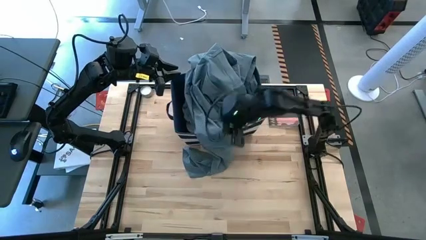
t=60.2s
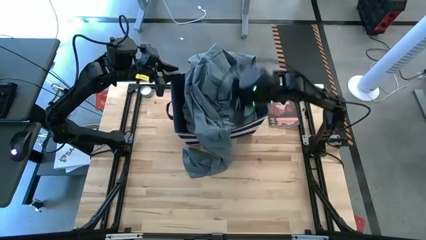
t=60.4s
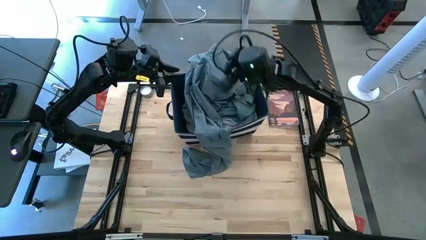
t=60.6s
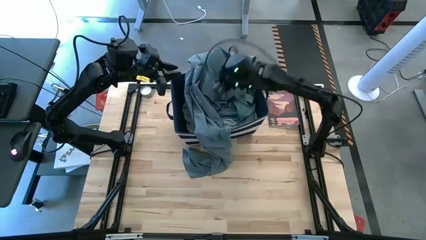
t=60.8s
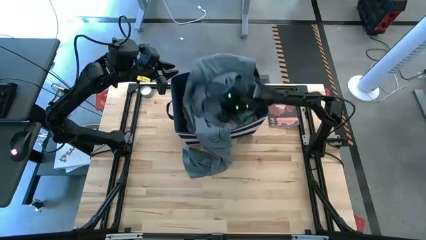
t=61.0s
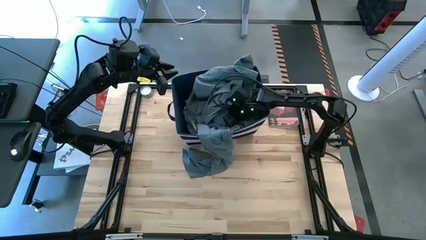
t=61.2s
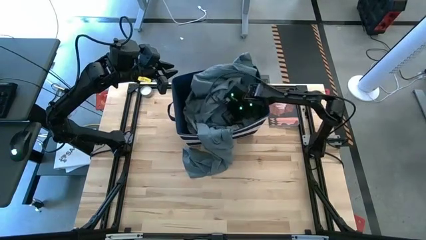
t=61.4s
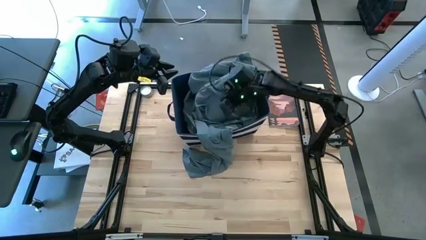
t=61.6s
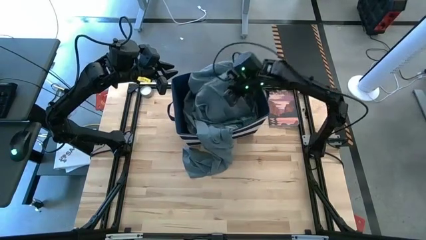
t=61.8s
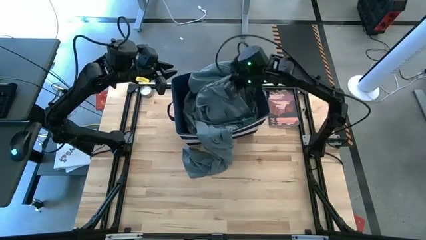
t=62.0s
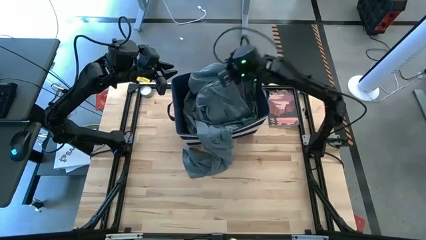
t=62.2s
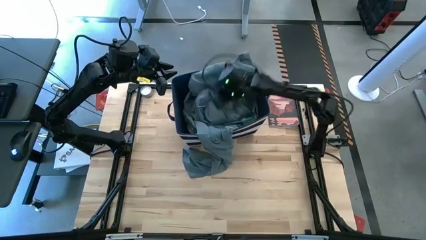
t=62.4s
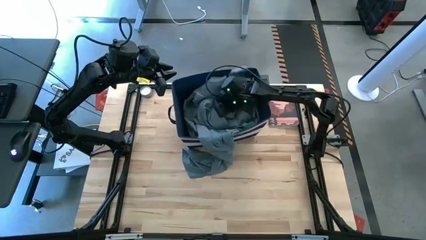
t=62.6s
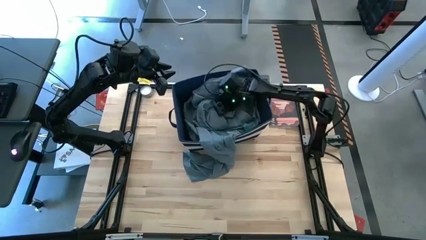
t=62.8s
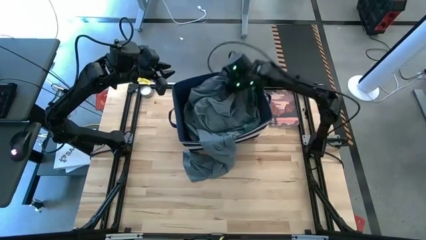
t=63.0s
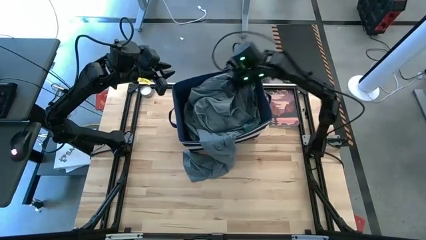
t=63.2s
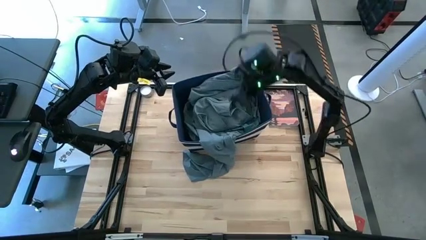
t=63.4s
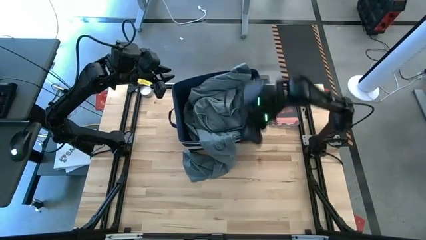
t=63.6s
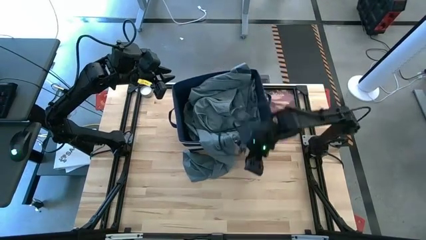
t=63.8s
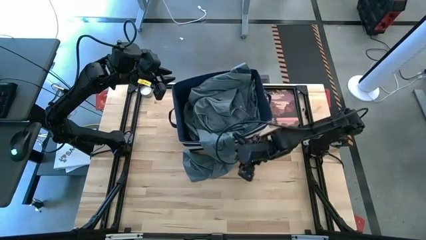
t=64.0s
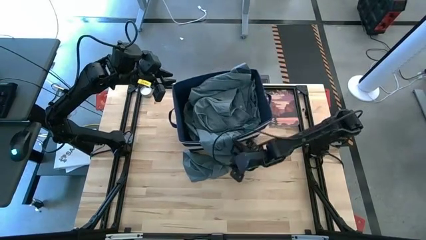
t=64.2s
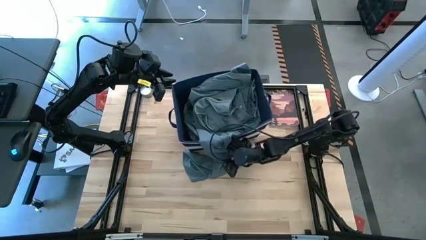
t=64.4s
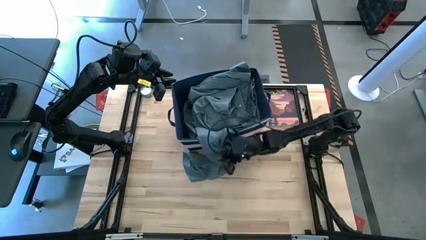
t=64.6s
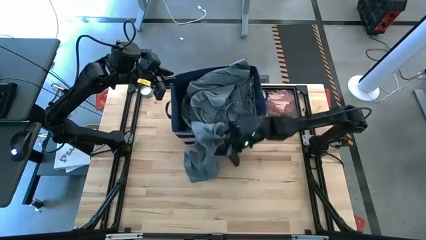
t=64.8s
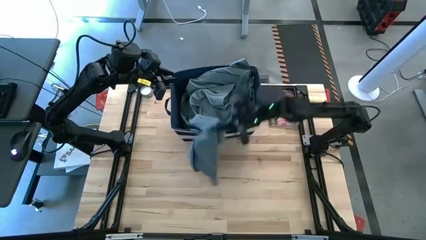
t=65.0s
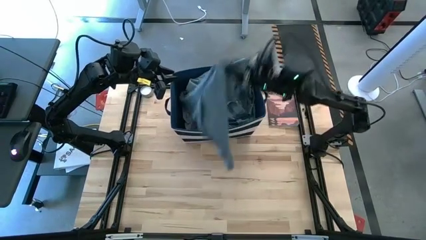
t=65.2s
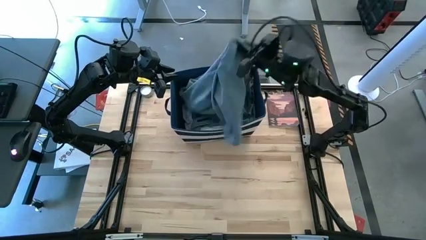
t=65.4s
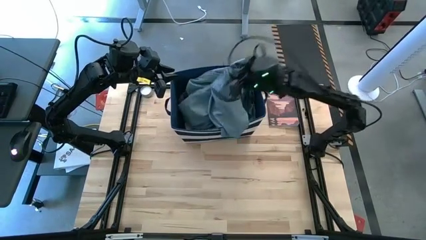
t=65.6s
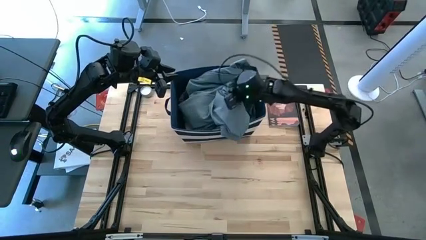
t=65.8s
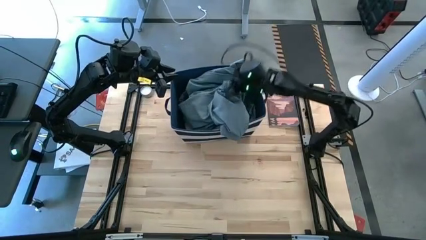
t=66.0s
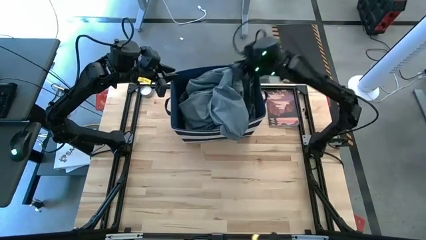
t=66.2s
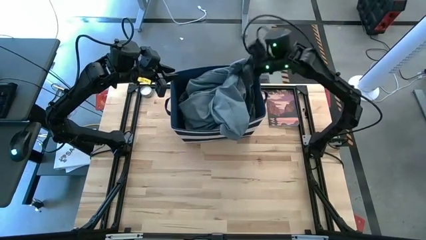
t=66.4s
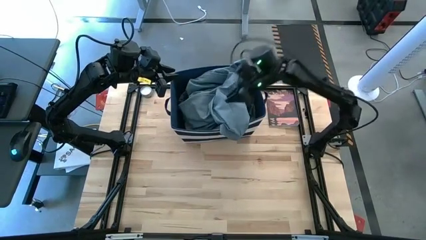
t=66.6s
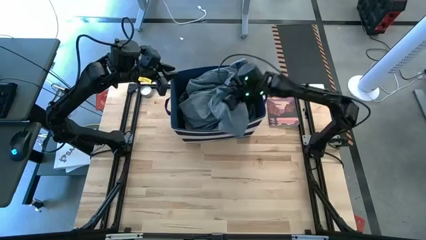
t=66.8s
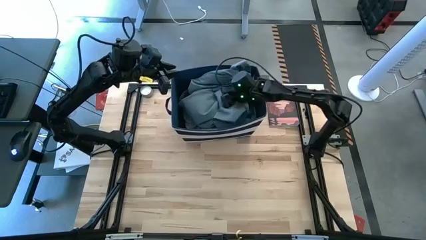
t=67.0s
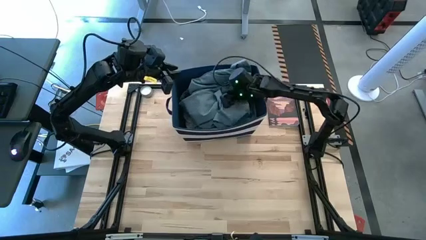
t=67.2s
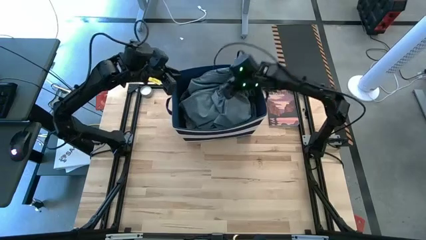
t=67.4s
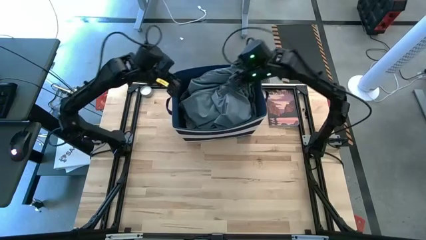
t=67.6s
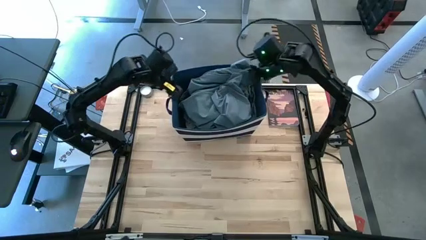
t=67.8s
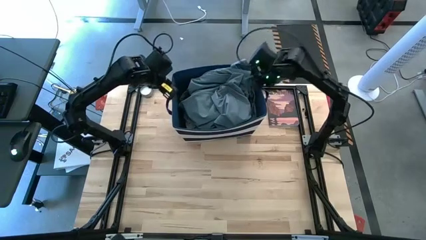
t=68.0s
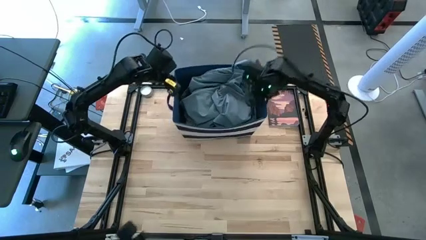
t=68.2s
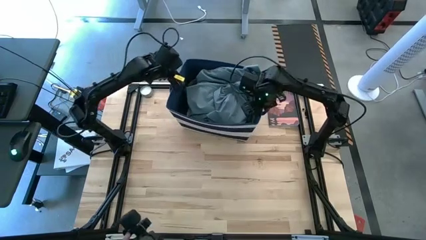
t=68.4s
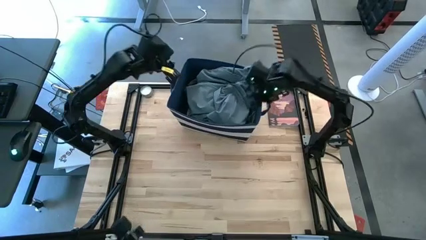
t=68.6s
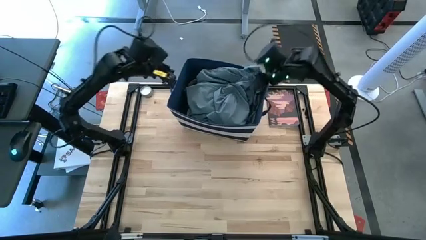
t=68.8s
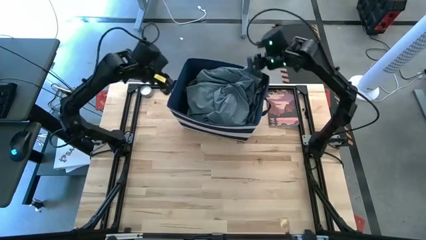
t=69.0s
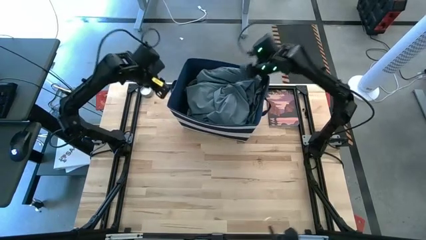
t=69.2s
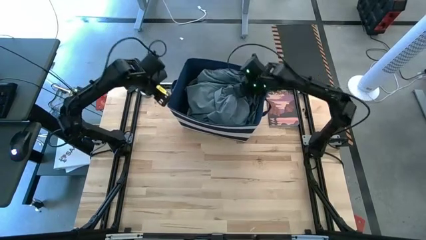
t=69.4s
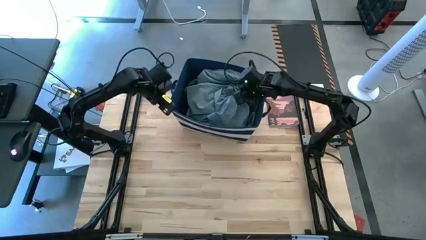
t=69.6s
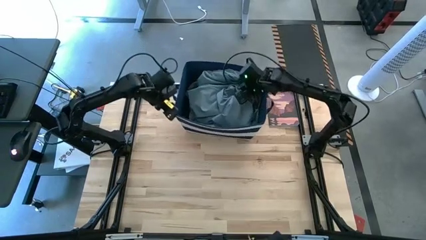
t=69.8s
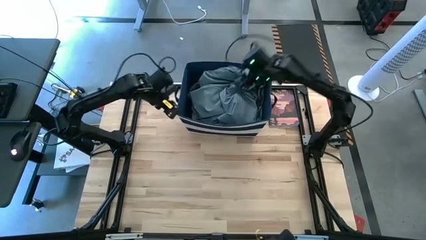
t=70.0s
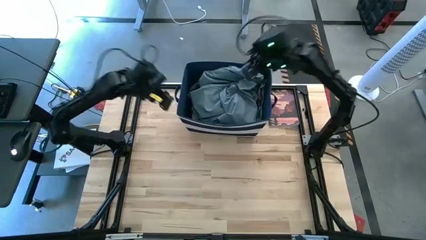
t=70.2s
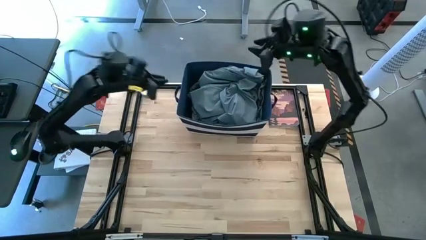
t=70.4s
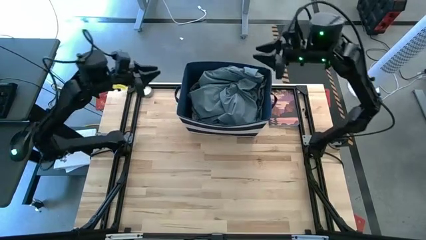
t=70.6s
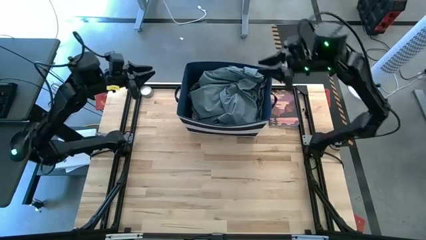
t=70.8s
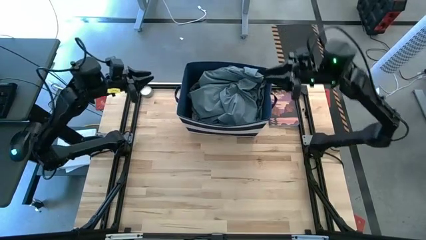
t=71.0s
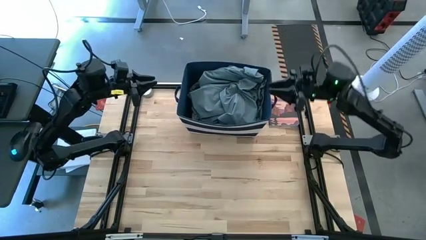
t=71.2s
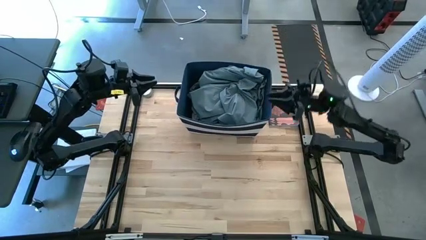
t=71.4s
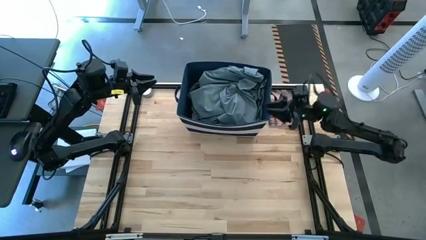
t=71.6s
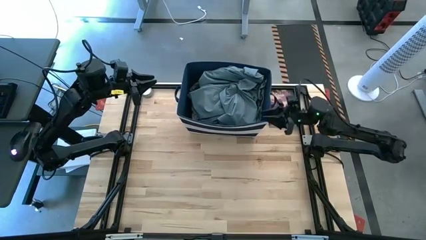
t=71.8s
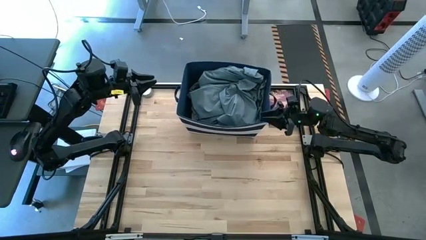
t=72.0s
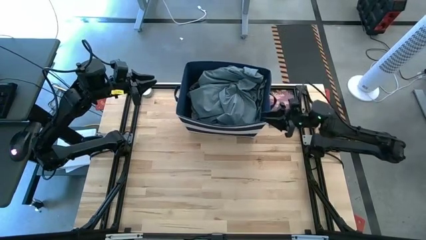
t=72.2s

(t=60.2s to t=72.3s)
Task: Sort clothes
Put the gray pants into the blue bin
